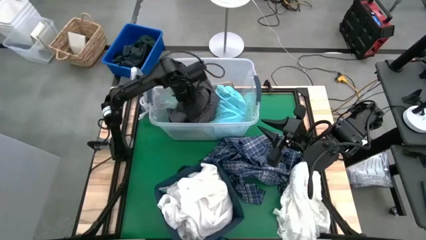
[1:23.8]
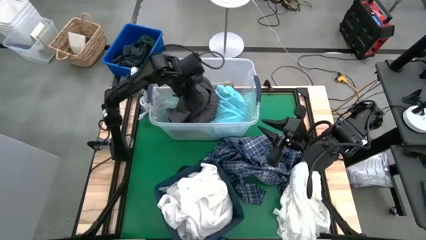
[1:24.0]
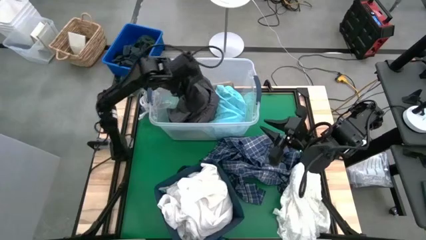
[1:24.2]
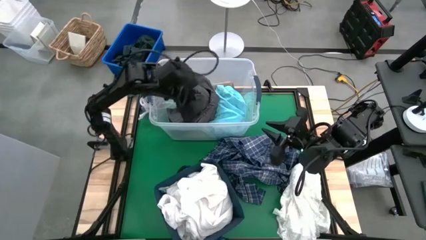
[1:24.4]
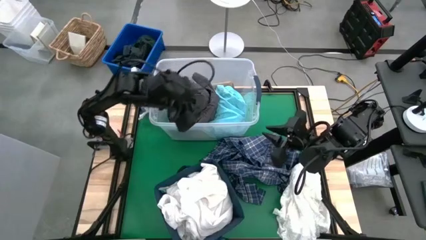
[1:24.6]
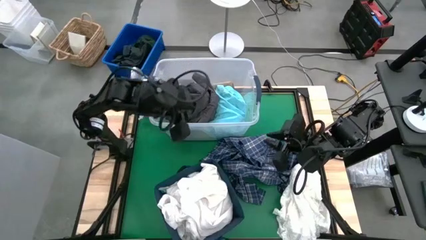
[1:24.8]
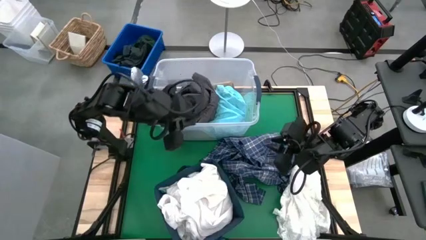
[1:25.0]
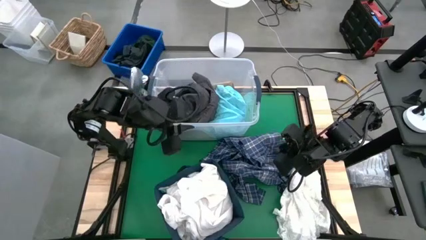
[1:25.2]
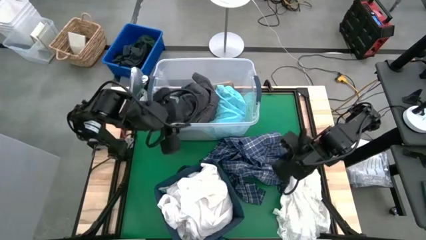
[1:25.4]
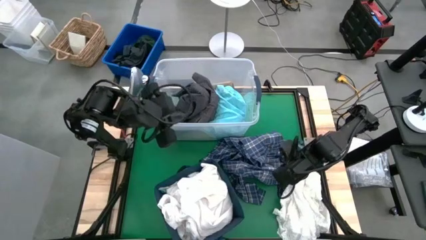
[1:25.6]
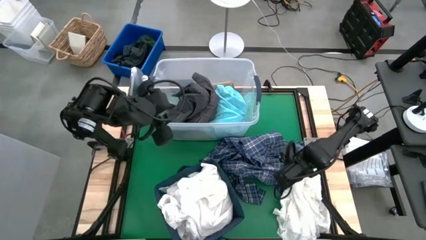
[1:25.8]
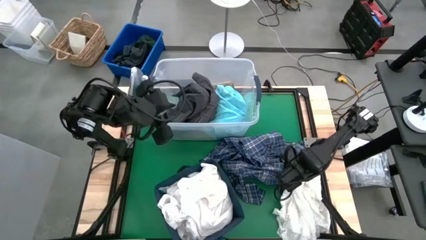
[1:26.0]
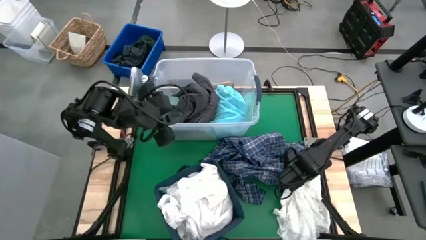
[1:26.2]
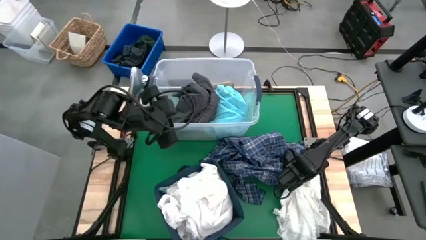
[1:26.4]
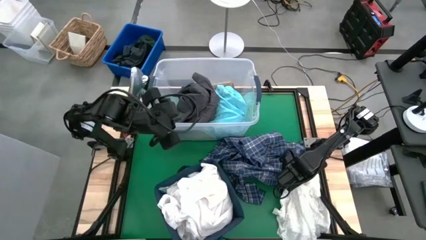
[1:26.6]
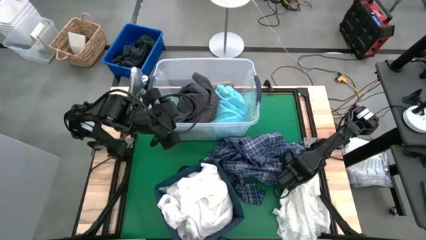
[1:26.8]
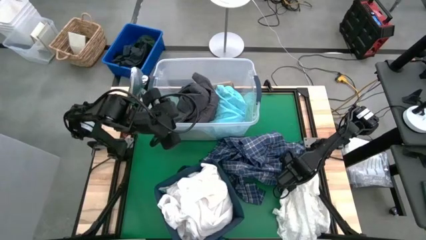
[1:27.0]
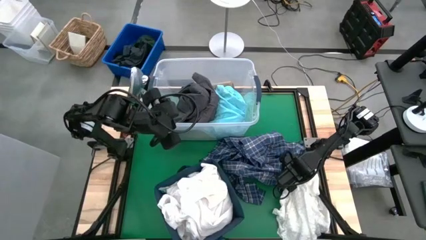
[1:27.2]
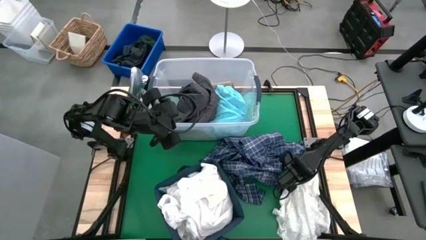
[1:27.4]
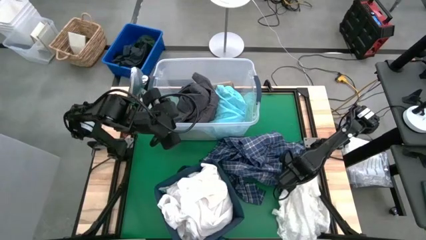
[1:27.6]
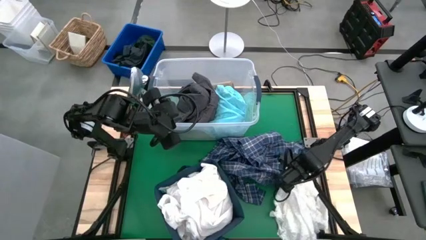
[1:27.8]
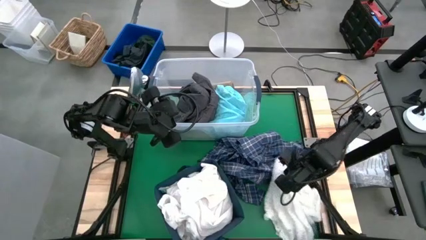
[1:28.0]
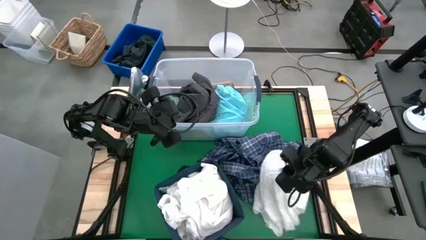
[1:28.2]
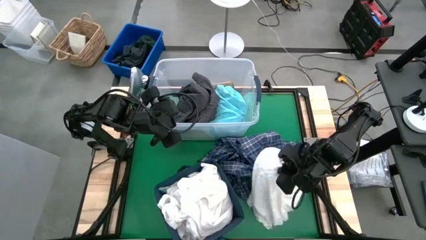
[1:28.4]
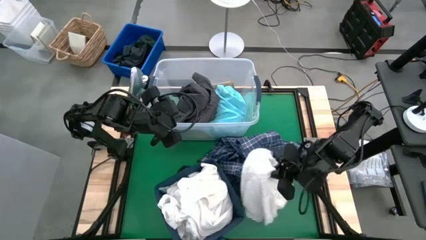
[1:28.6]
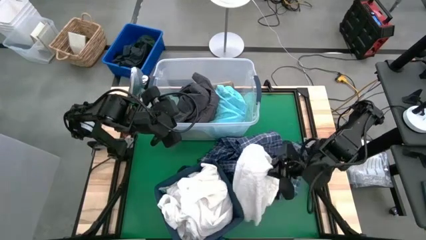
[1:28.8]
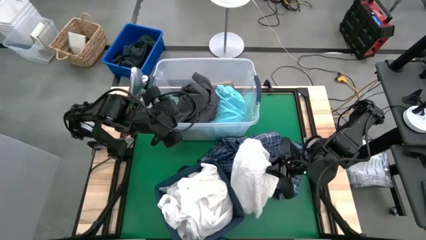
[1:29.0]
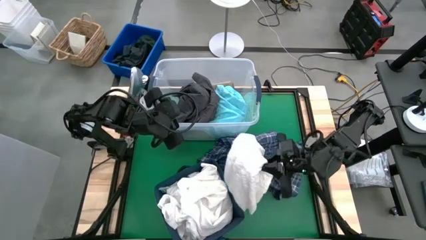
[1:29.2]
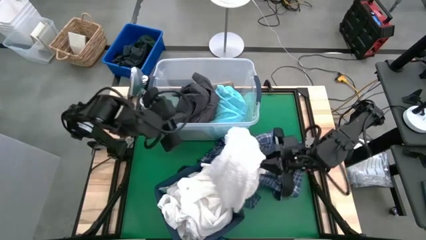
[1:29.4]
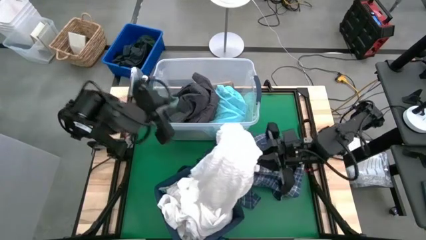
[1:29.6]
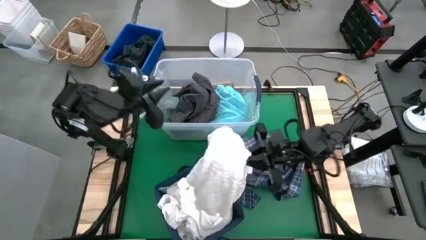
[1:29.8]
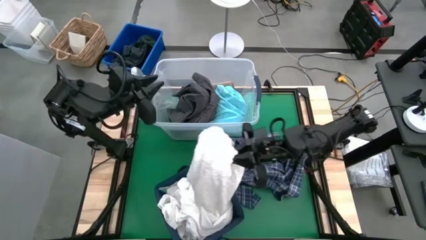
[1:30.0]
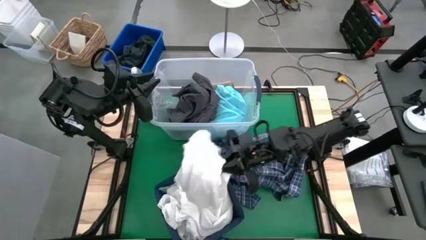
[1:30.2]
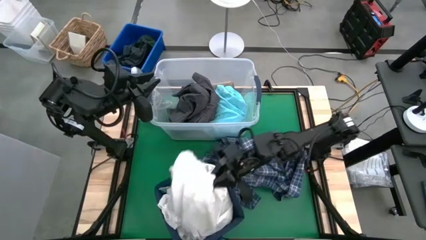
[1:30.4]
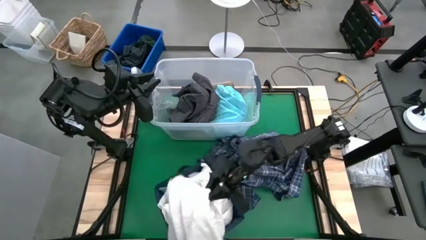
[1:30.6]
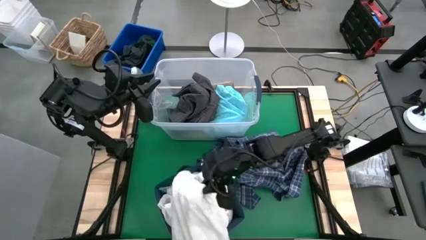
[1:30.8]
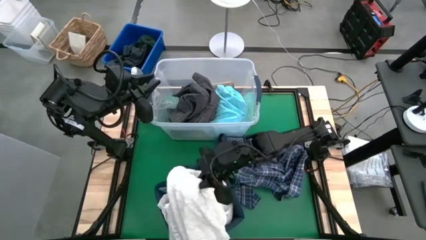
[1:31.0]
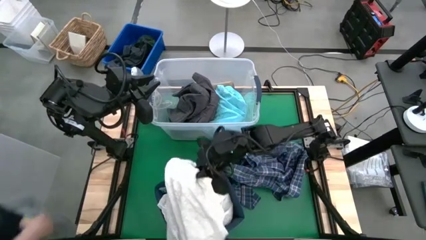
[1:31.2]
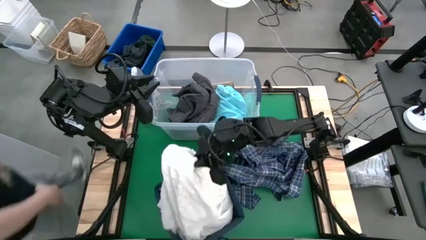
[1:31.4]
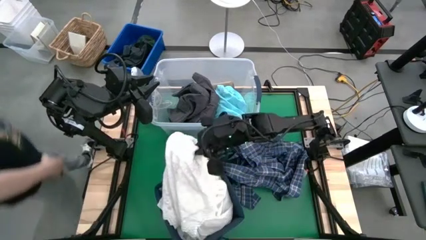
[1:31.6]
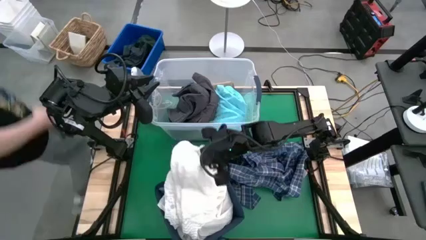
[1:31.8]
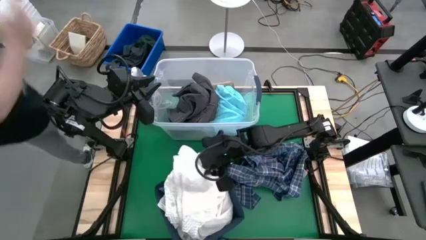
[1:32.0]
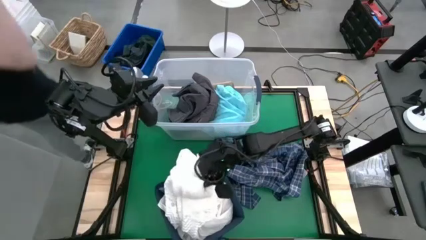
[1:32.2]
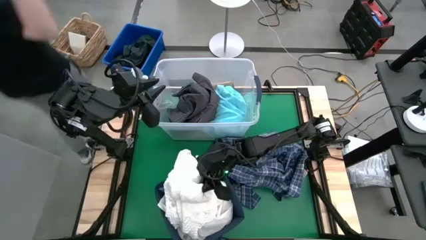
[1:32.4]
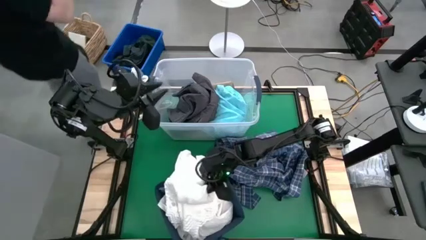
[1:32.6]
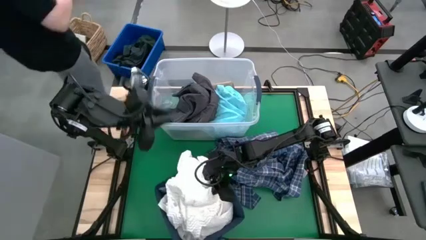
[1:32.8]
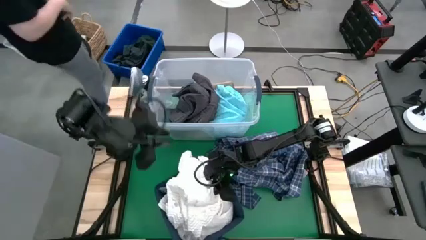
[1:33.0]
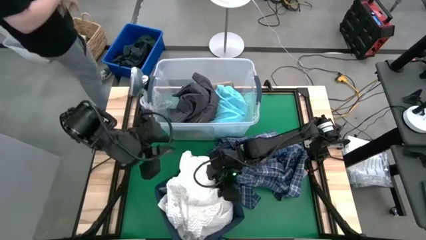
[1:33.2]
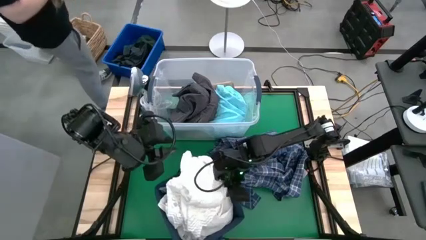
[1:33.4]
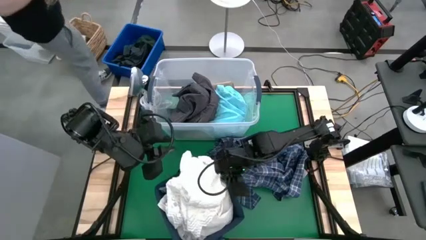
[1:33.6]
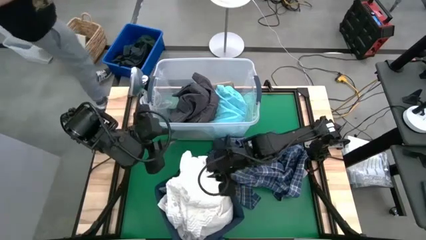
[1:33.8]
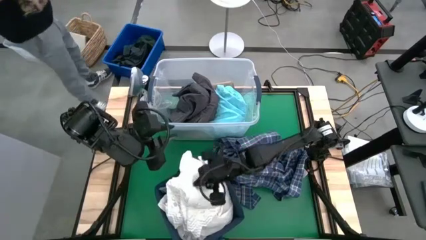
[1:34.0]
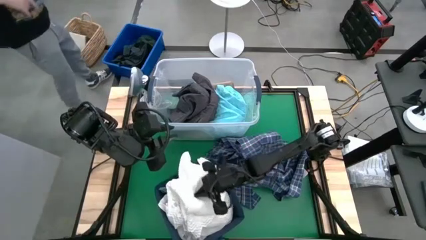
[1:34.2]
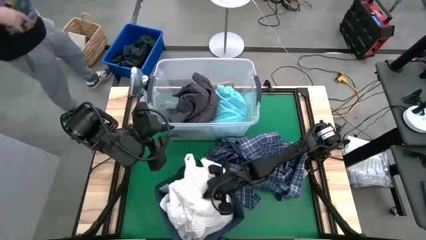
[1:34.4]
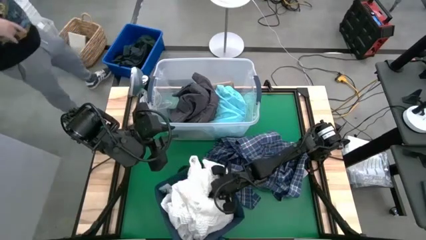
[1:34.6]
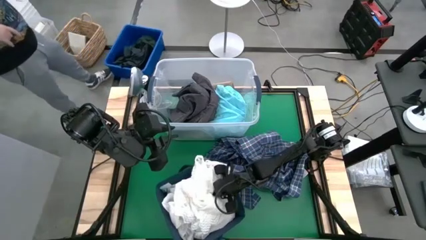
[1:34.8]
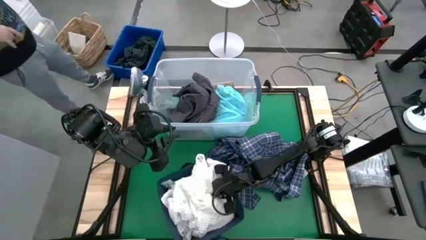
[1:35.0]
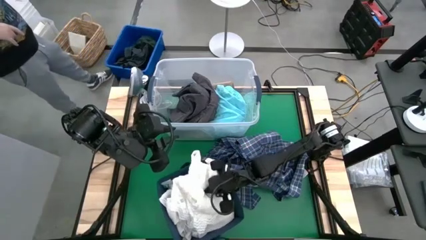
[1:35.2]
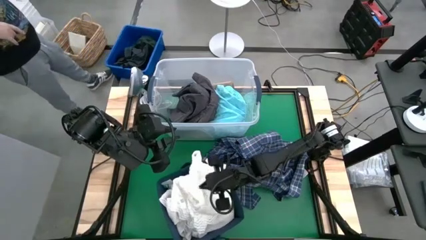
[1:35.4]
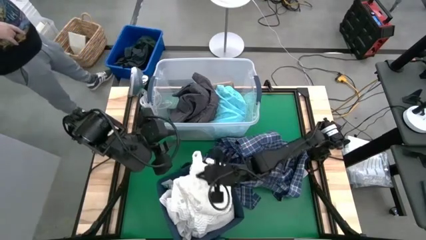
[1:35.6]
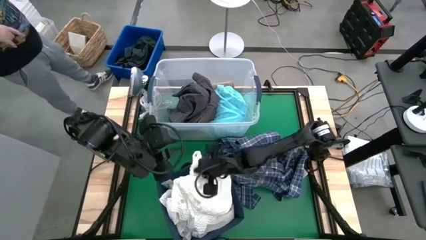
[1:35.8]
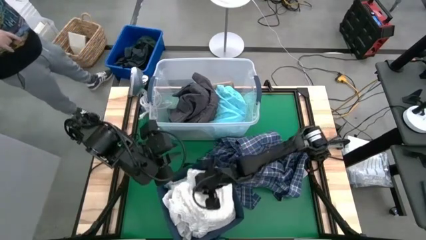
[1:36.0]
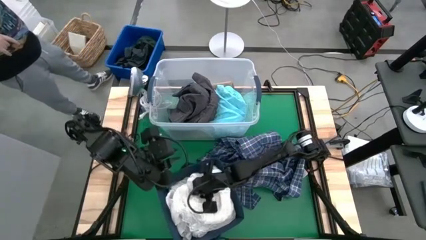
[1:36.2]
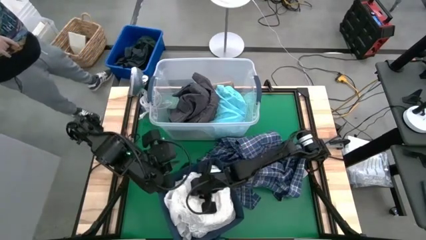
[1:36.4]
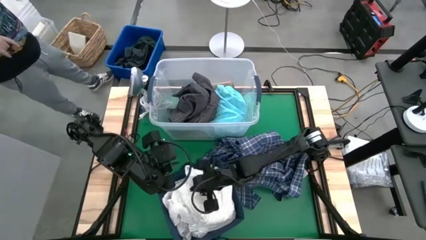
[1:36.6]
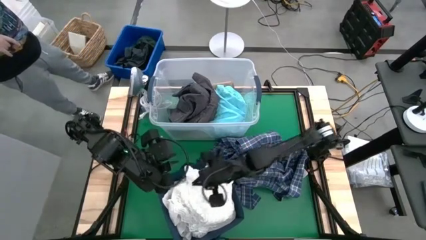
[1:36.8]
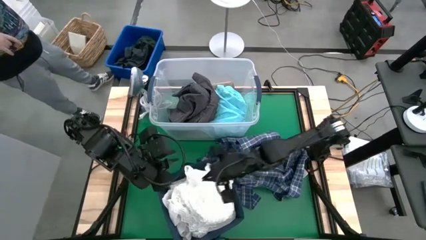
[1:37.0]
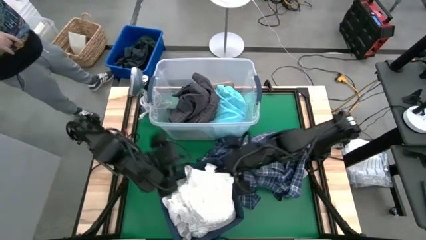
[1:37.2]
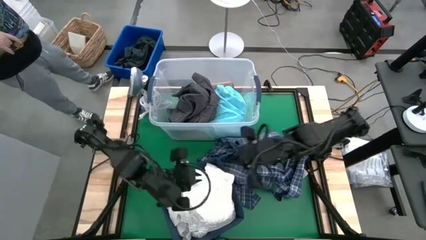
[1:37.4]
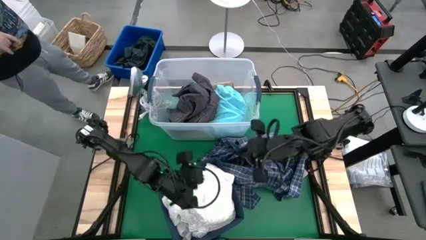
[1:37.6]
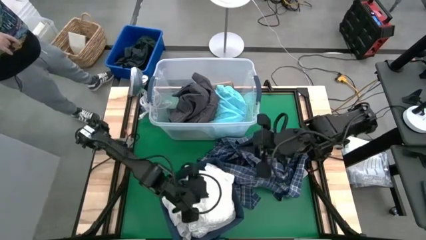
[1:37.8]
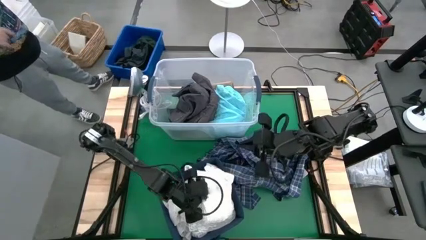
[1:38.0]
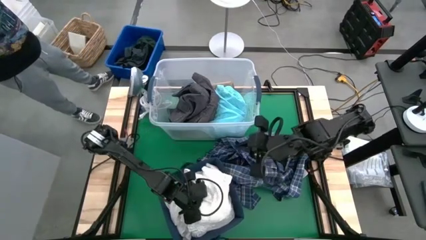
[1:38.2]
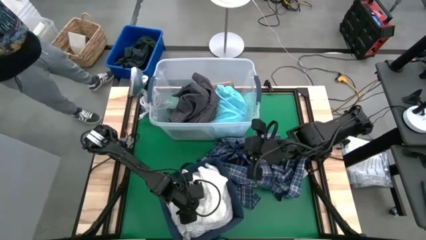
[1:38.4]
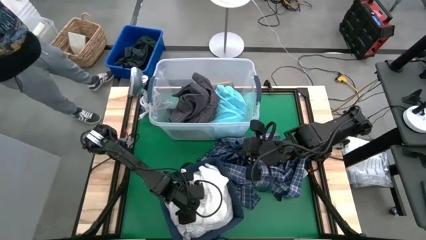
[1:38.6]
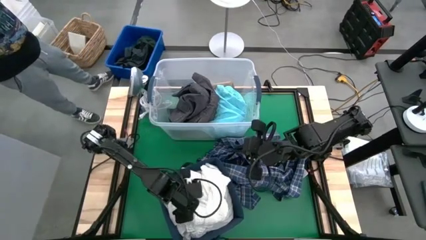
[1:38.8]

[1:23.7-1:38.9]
Task: Sort clothes
Put the white dress into the blue laundry bin

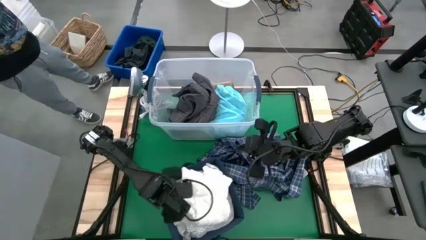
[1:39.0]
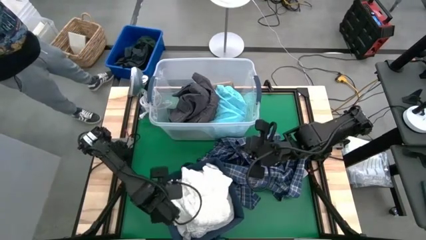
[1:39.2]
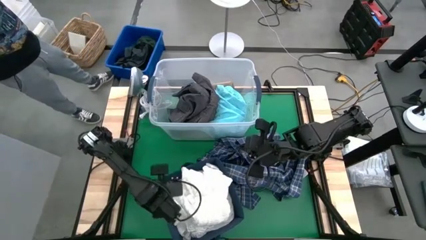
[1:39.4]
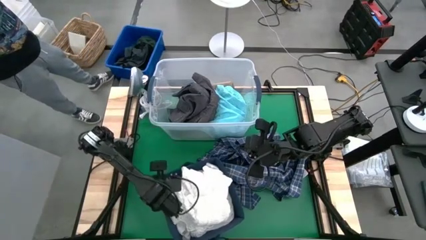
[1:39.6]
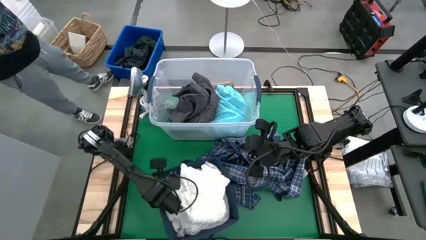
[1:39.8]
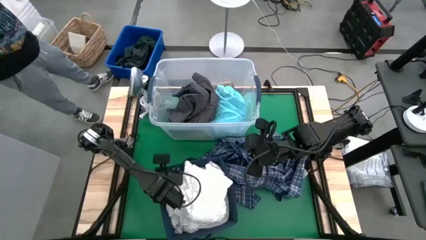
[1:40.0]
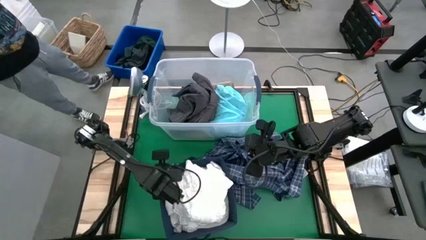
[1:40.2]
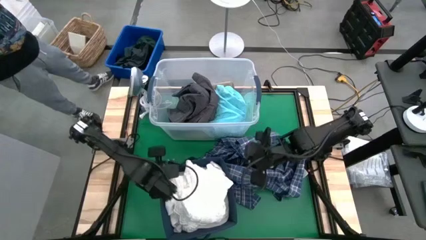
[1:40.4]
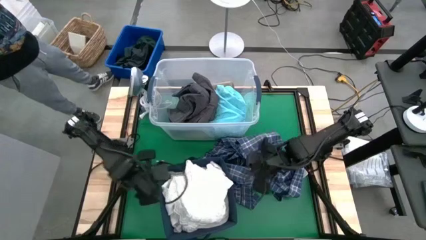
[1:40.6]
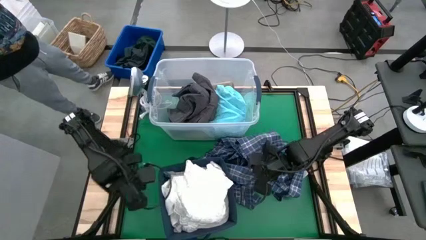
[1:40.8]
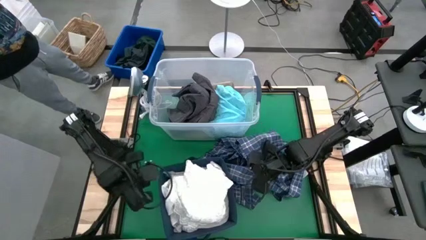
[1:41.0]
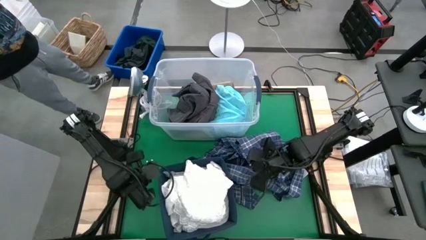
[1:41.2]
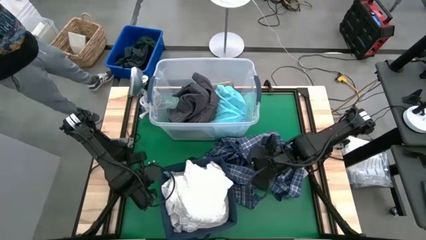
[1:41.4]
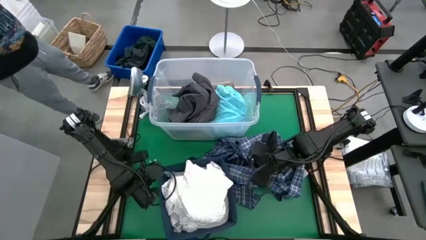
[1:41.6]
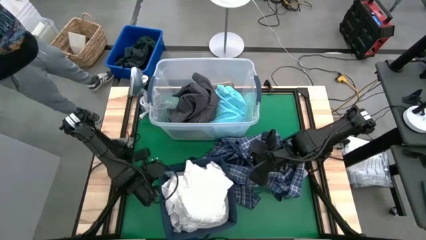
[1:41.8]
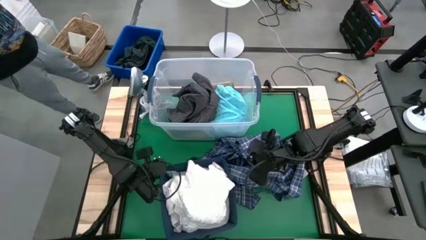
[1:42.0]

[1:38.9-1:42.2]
Adjust the blue laundry bin
